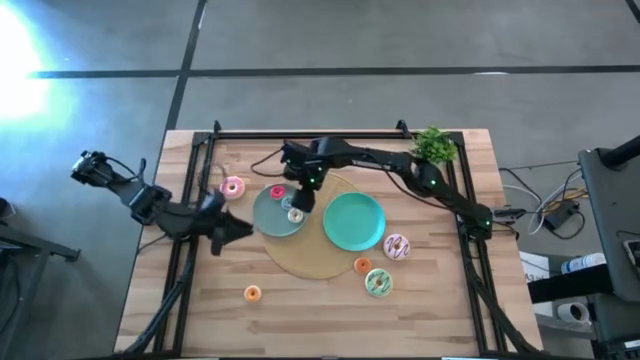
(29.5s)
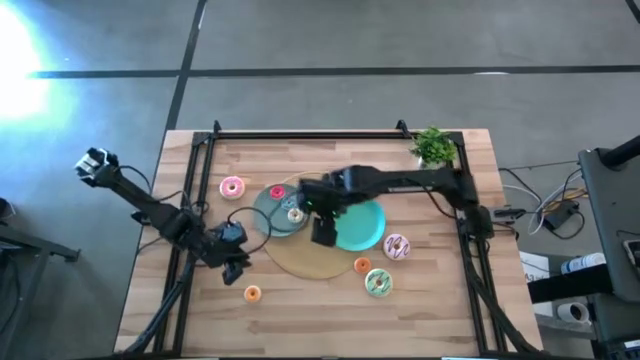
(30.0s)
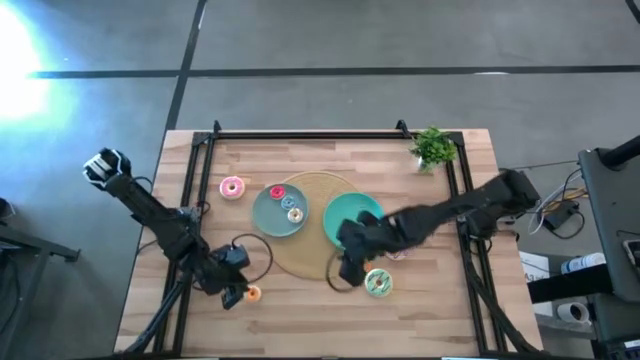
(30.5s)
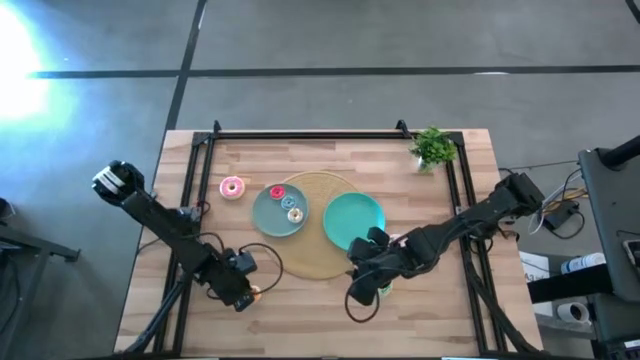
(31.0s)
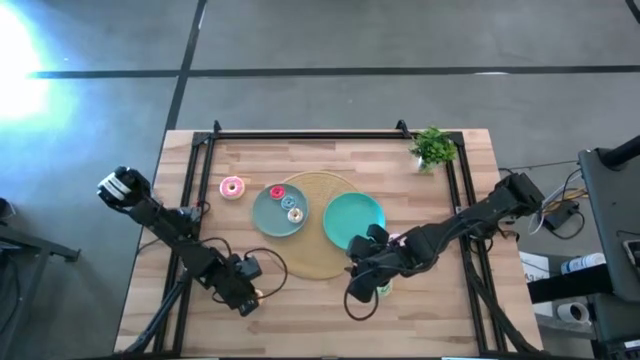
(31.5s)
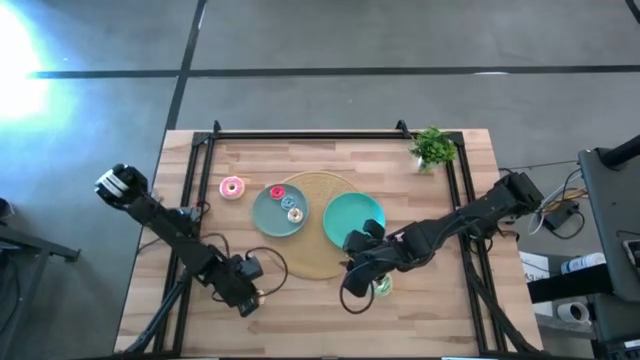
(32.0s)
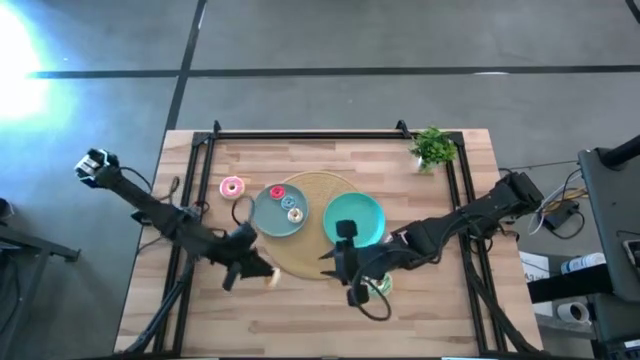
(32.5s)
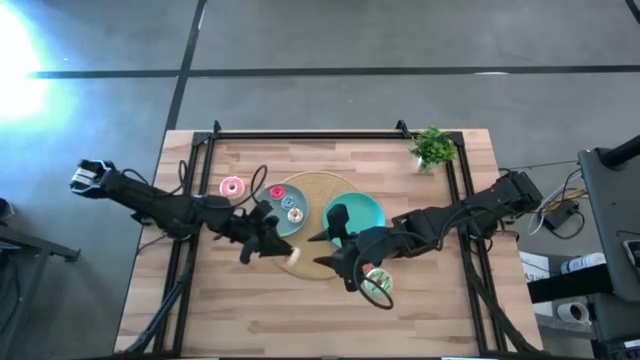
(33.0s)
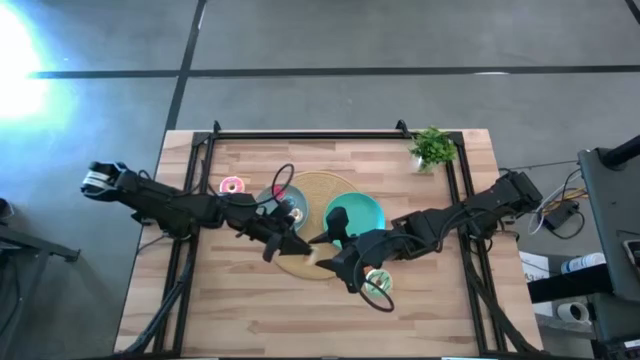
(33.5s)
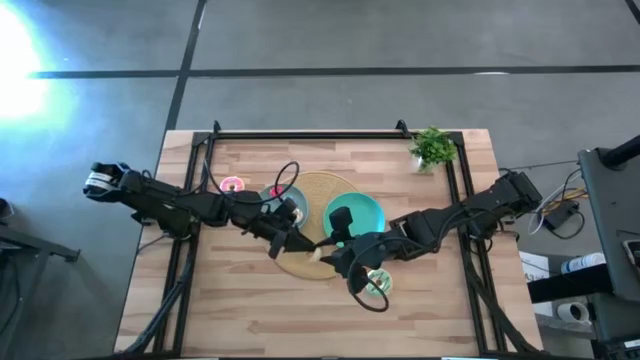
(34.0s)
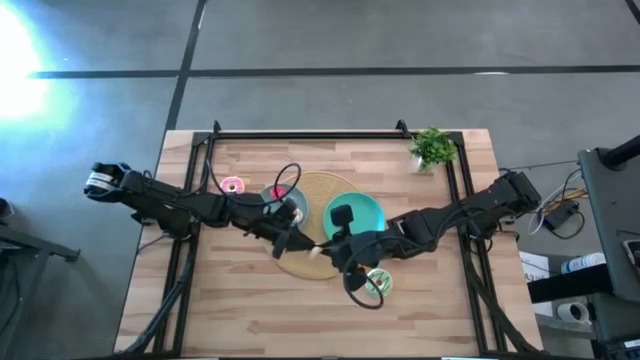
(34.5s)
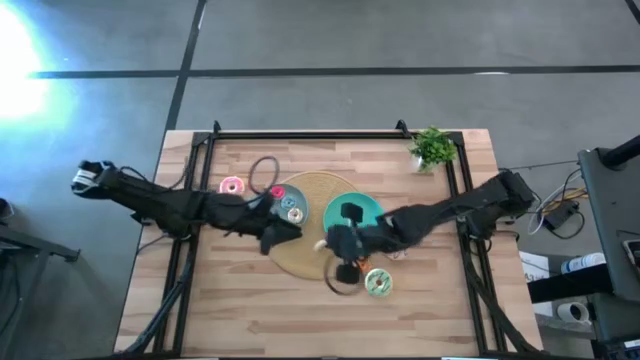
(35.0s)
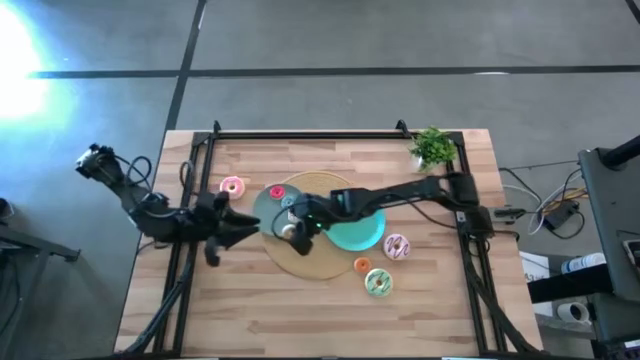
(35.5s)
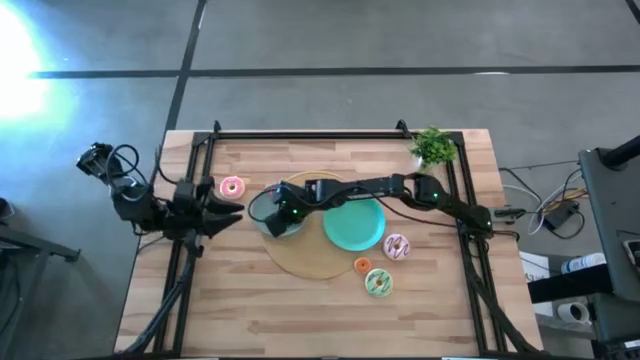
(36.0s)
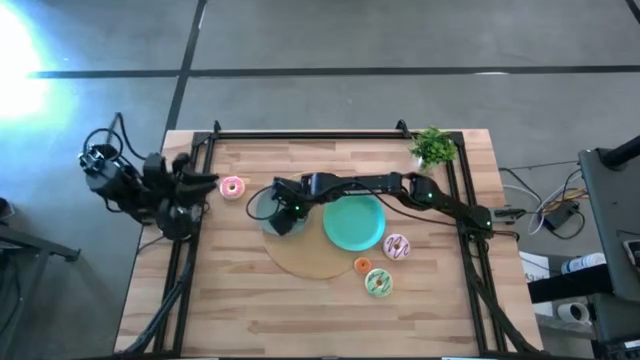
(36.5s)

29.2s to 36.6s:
Task: Pick & Place donuts
Put the small yellow donut on the light blue plate

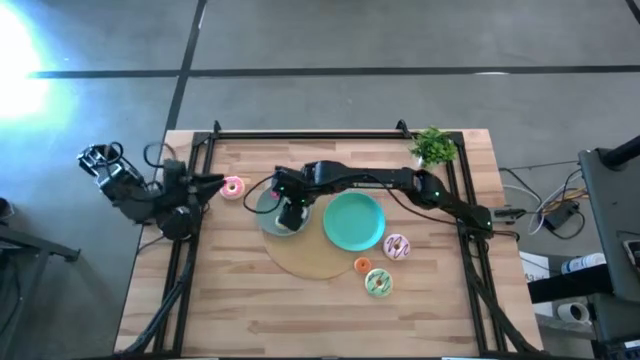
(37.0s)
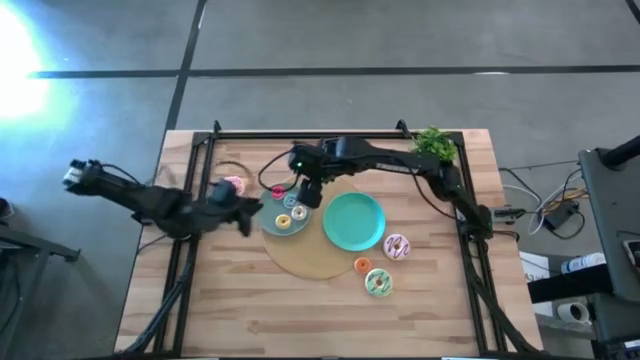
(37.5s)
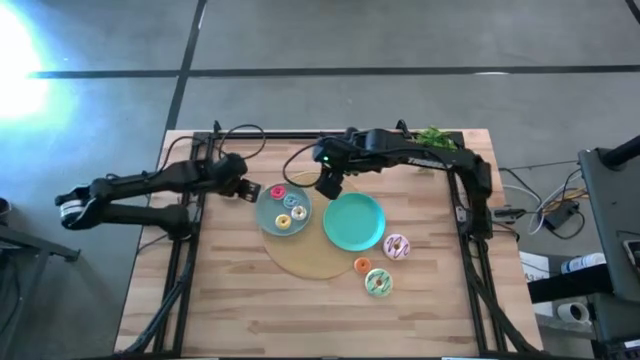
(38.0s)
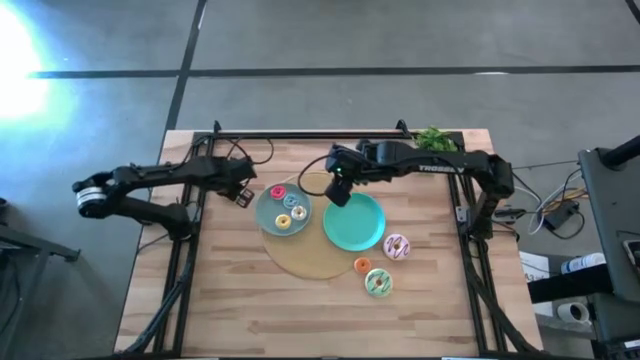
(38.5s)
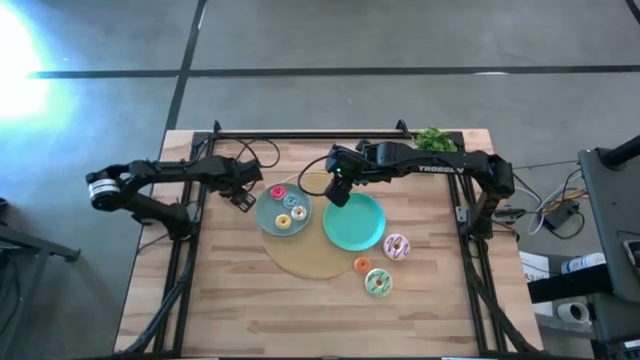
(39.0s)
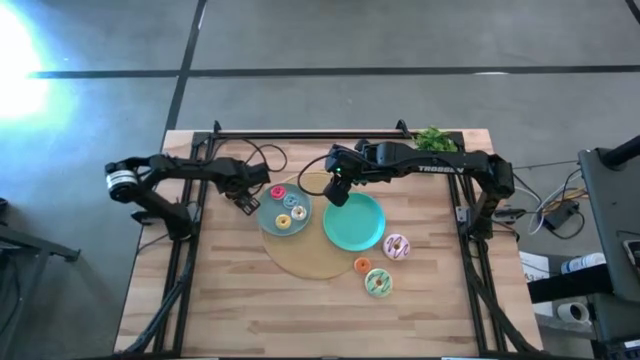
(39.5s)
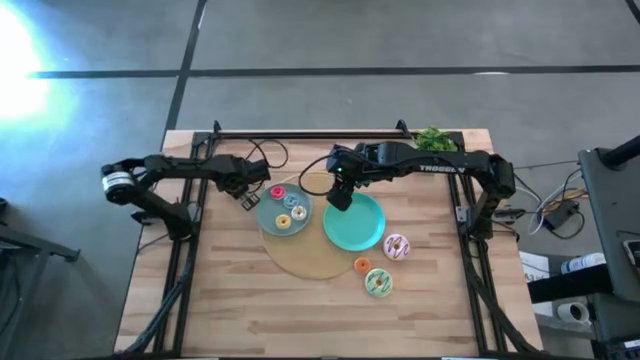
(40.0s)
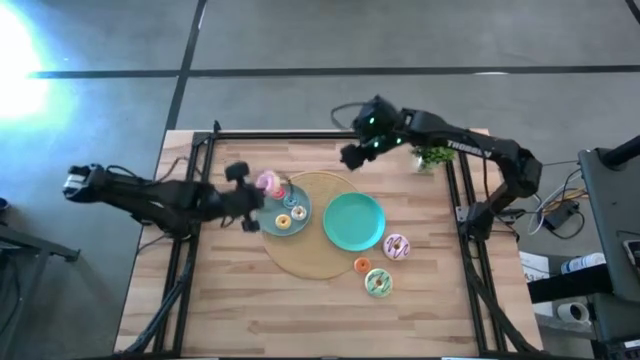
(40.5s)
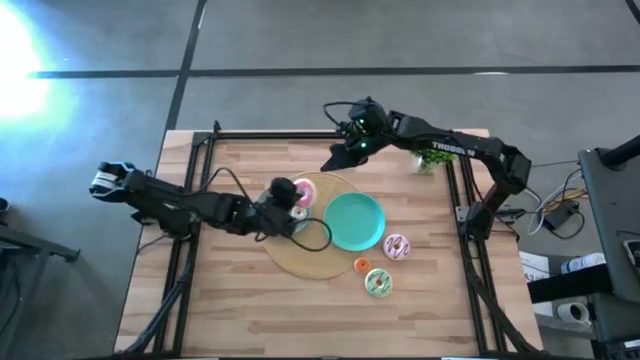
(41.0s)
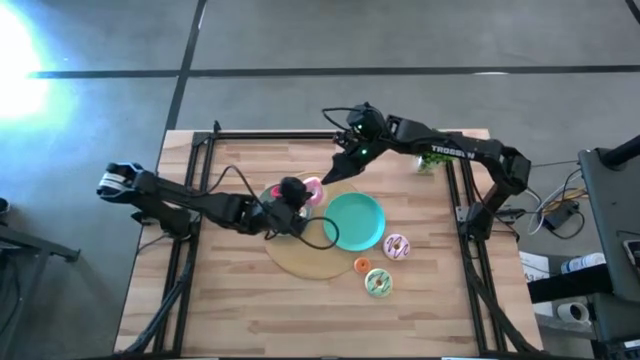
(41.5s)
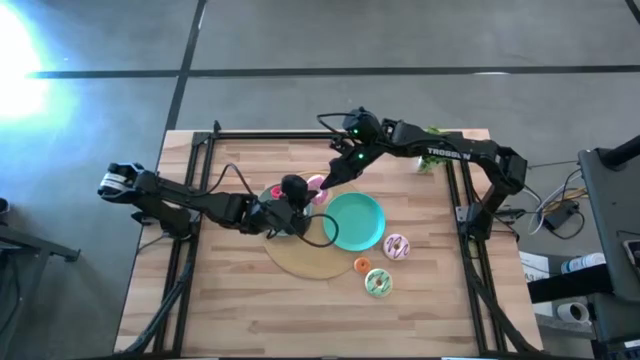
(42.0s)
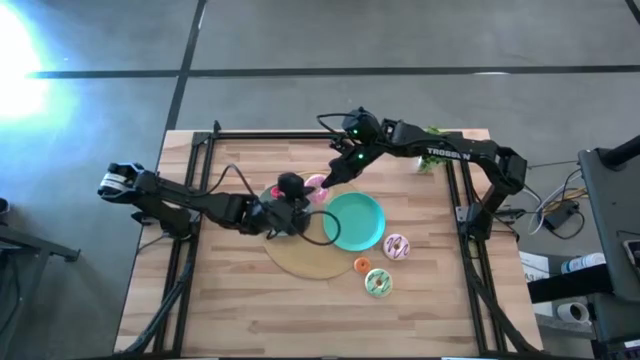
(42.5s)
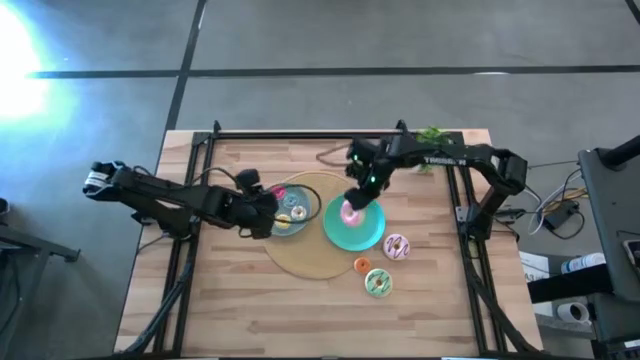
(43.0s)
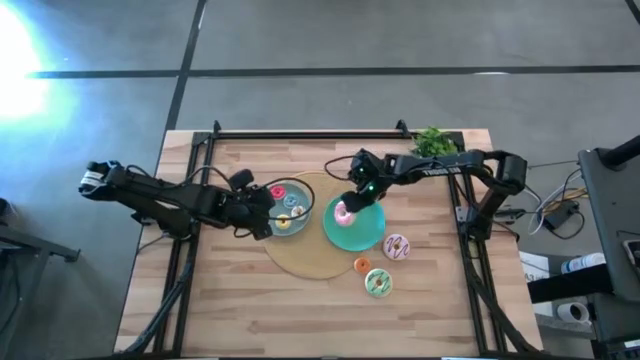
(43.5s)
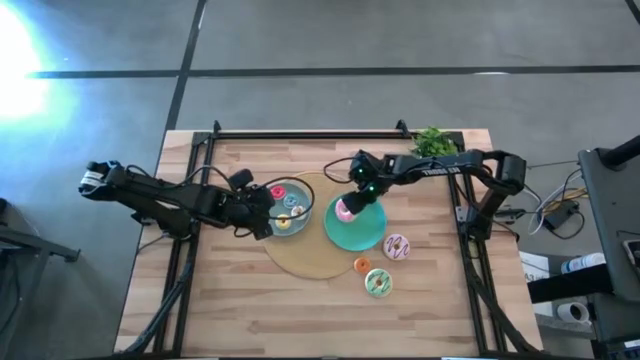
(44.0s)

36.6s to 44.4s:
Put the big pink donut on the light green plate

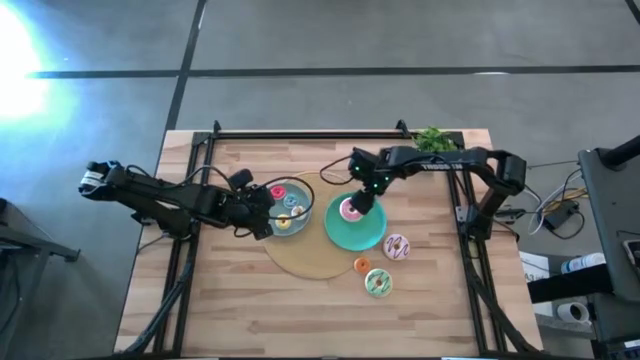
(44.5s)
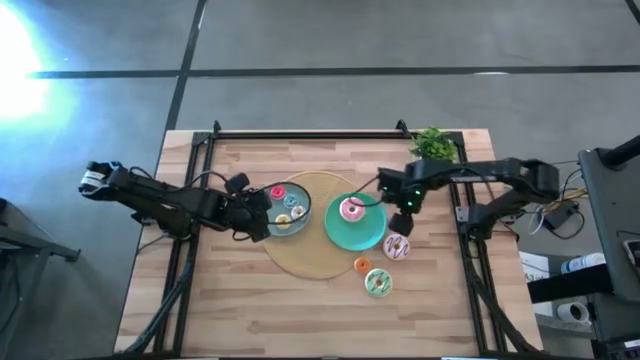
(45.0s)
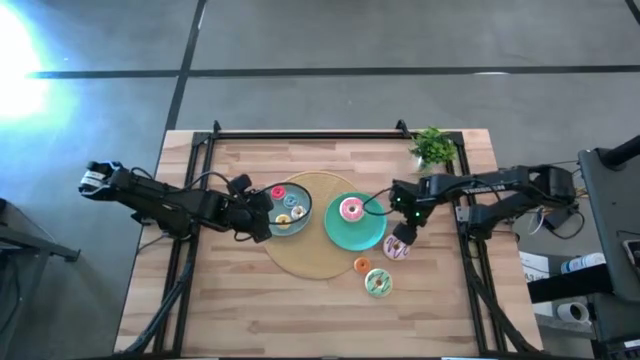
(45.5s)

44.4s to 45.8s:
Put the big purple donut on the light green plate

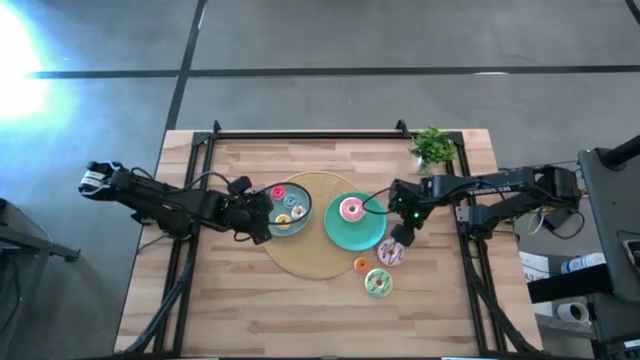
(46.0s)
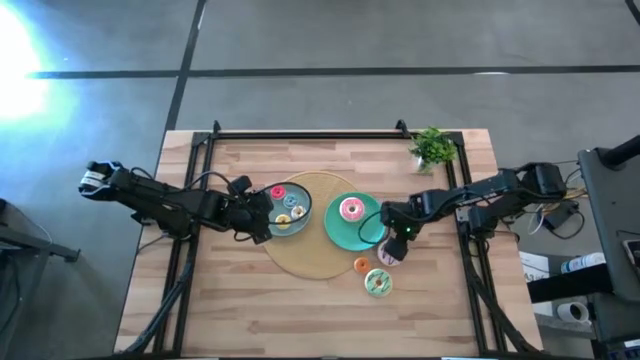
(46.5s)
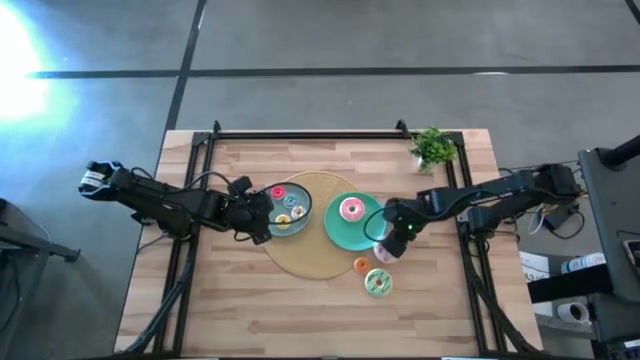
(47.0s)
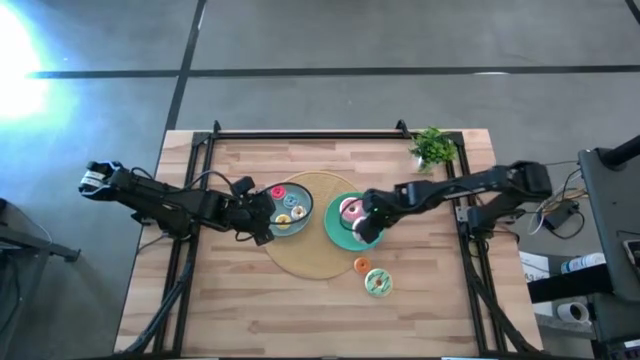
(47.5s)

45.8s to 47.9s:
Put the big purple donut on the light green plate

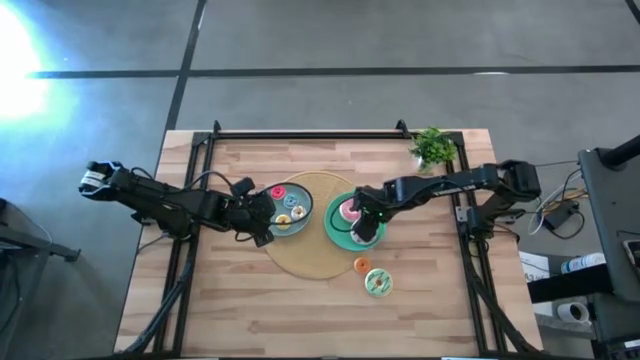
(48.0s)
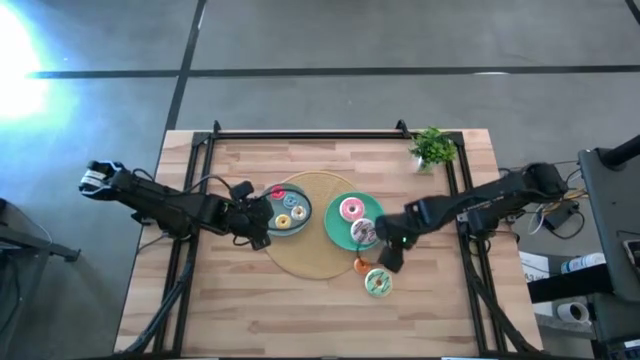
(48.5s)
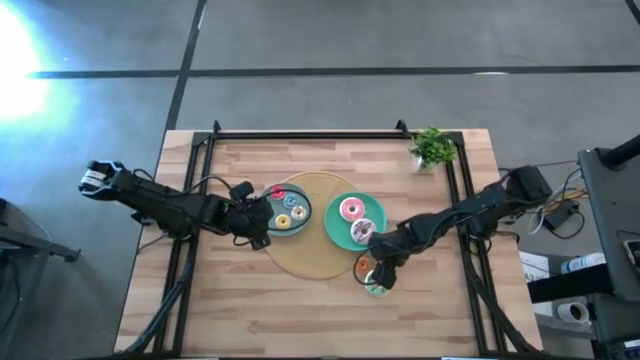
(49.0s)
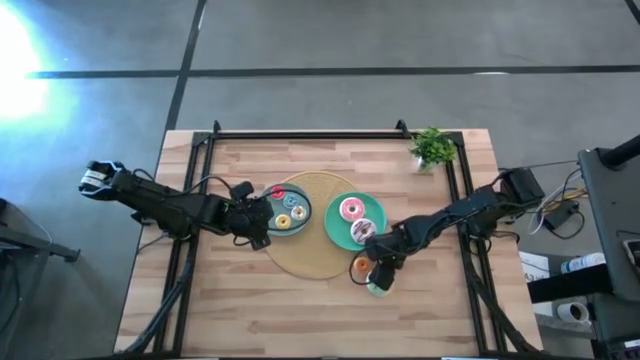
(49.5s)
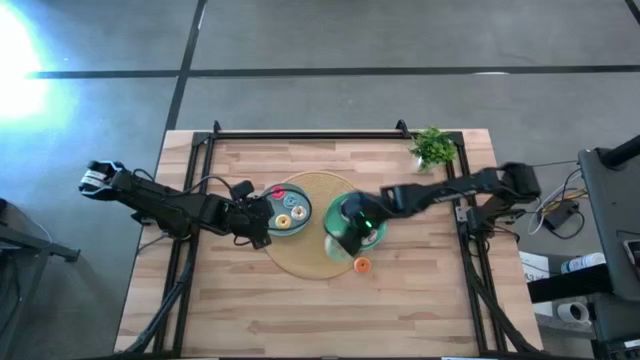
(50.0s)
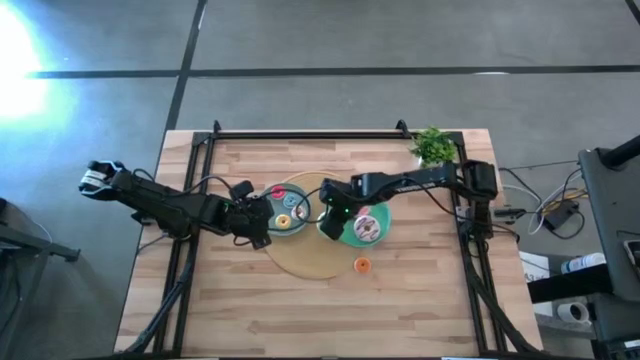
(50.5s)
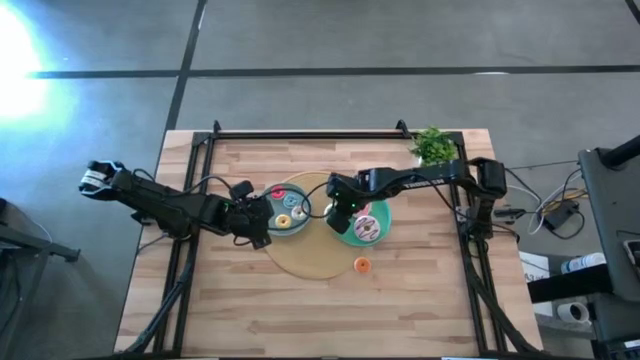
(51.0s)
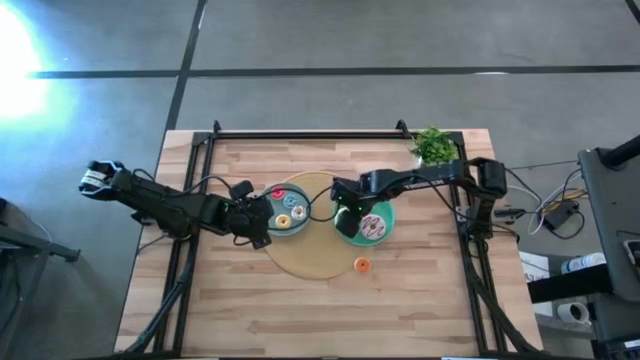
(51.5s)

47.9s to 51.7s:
Put the big green donut on the light green plate
